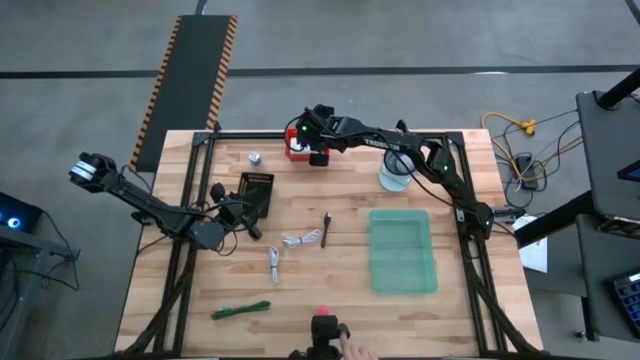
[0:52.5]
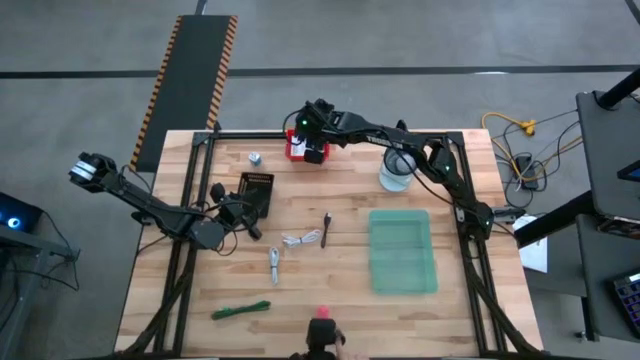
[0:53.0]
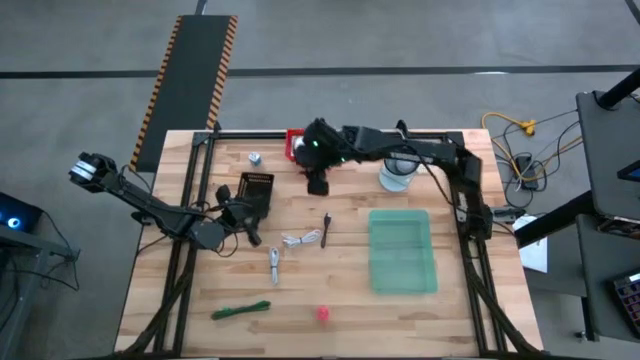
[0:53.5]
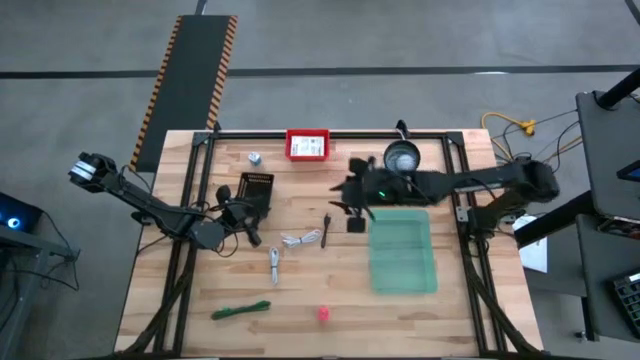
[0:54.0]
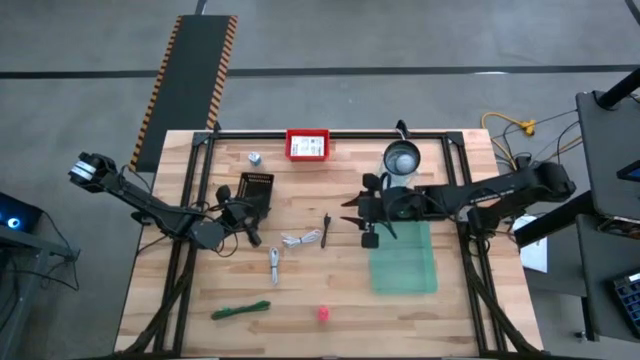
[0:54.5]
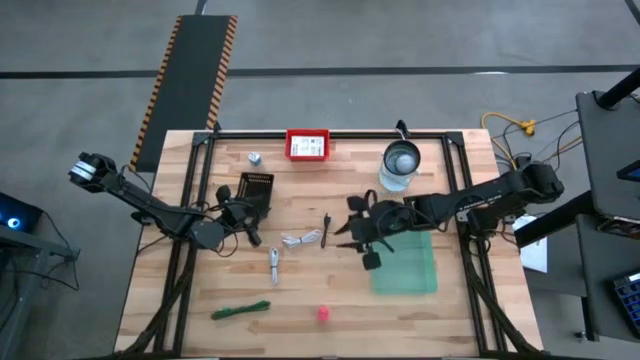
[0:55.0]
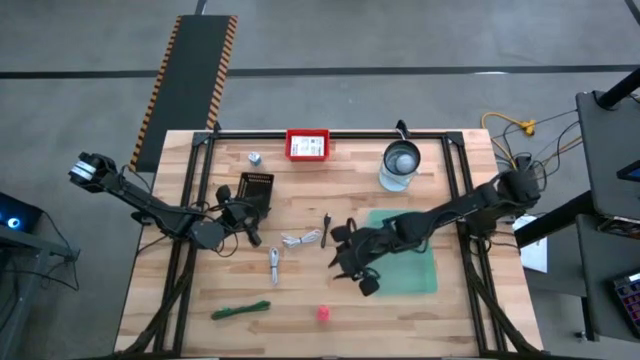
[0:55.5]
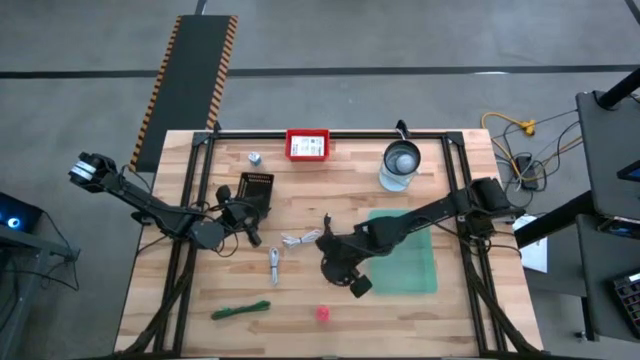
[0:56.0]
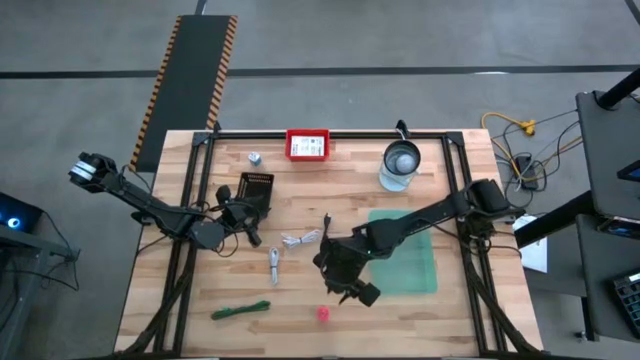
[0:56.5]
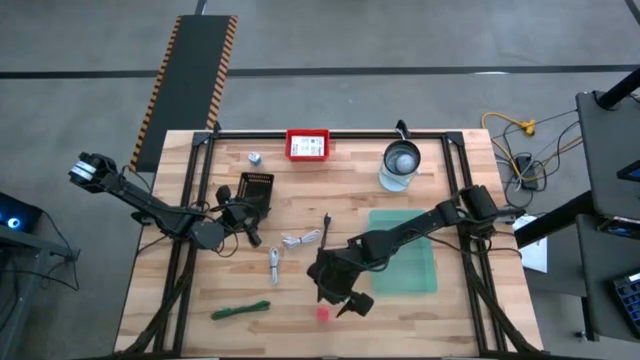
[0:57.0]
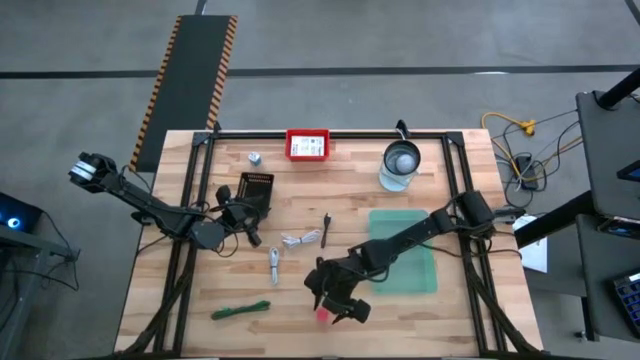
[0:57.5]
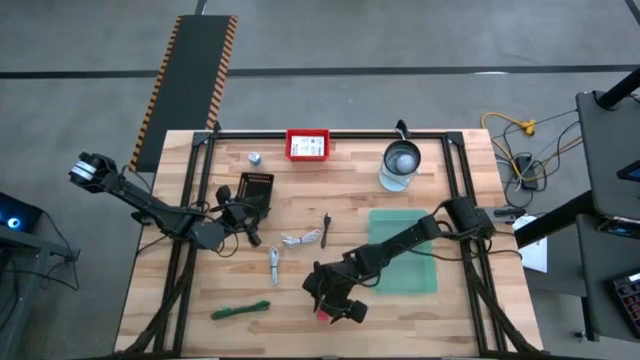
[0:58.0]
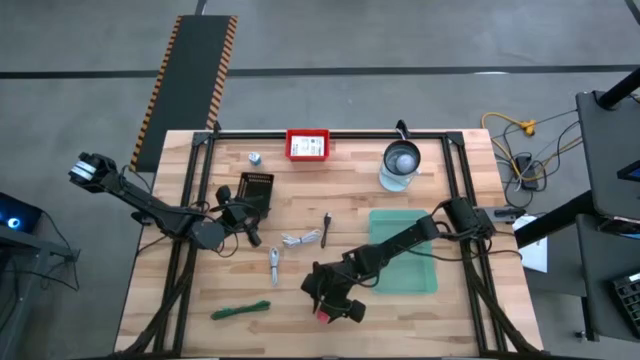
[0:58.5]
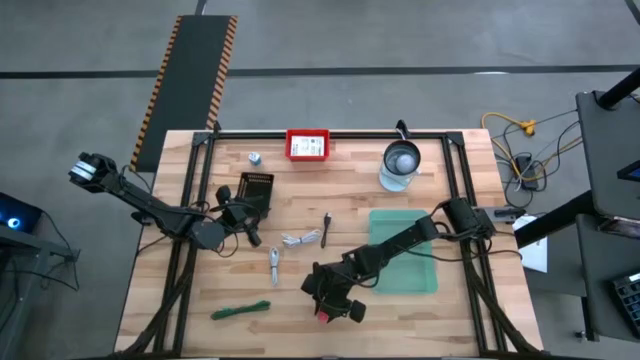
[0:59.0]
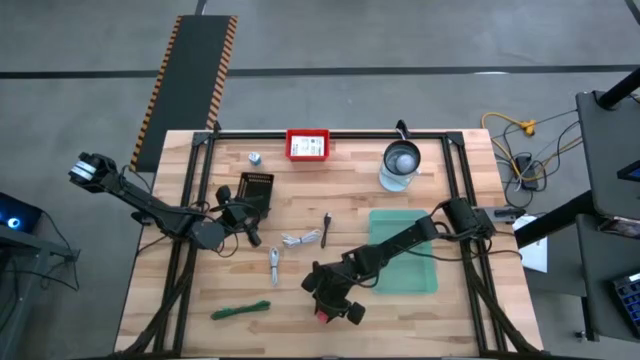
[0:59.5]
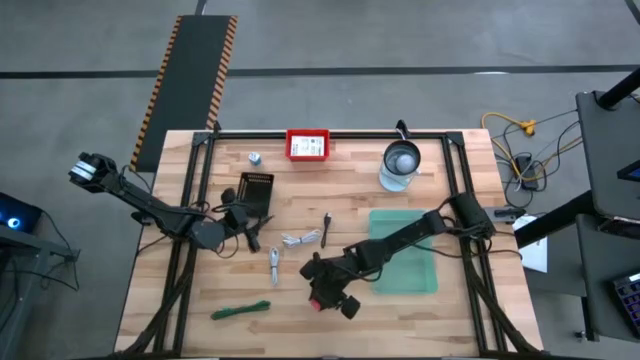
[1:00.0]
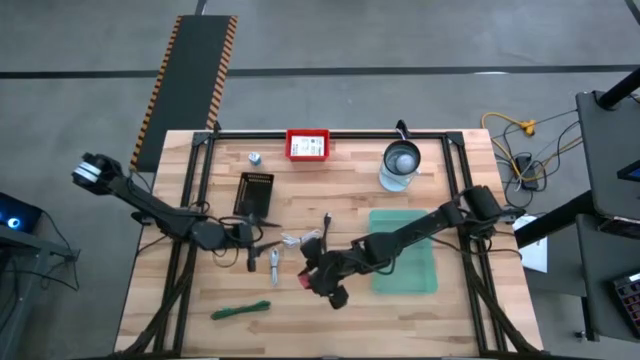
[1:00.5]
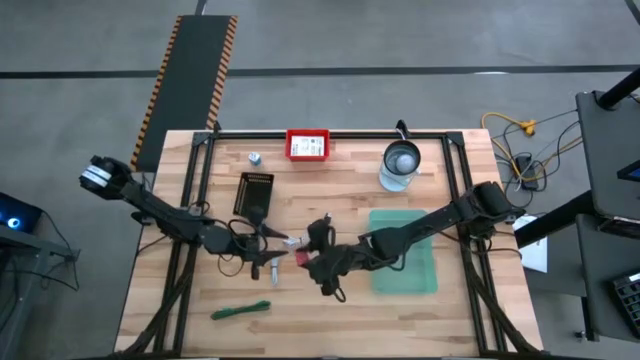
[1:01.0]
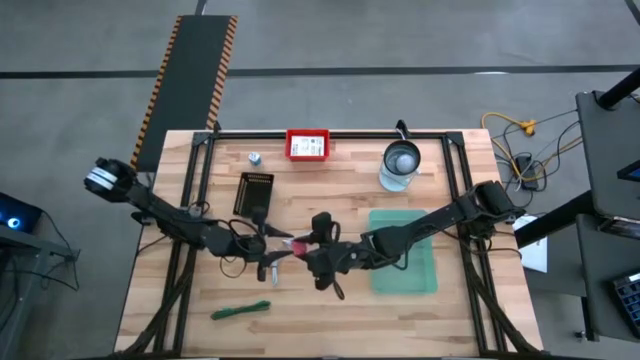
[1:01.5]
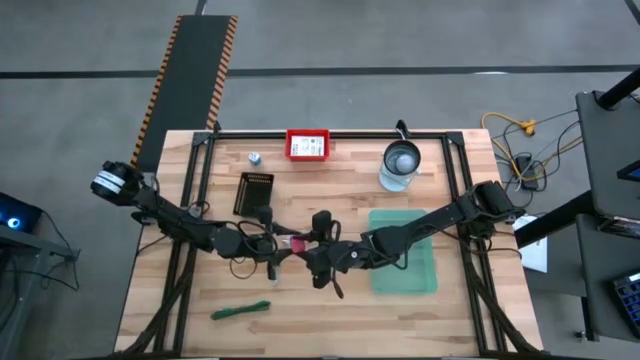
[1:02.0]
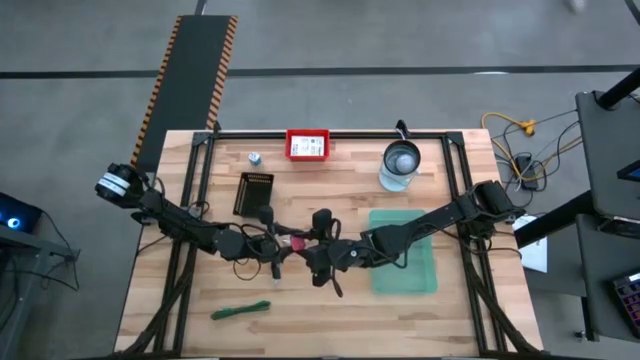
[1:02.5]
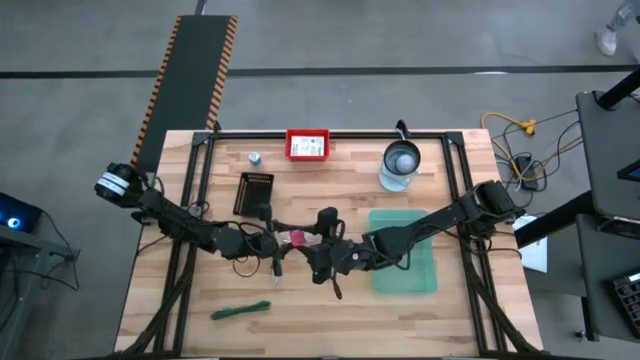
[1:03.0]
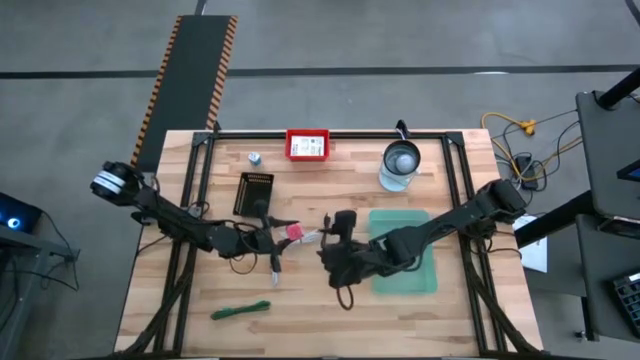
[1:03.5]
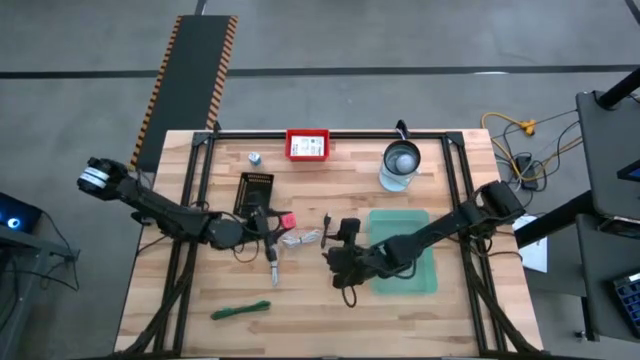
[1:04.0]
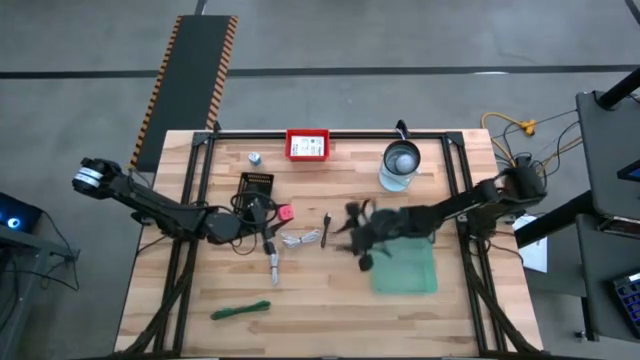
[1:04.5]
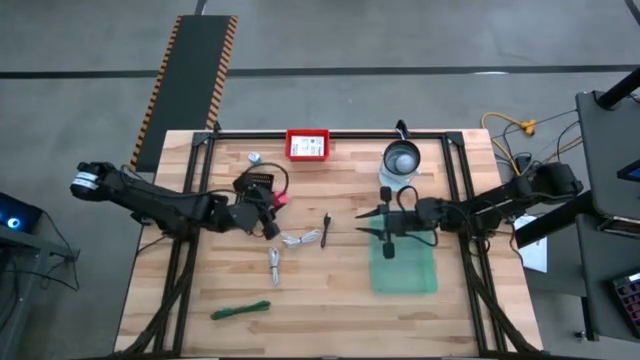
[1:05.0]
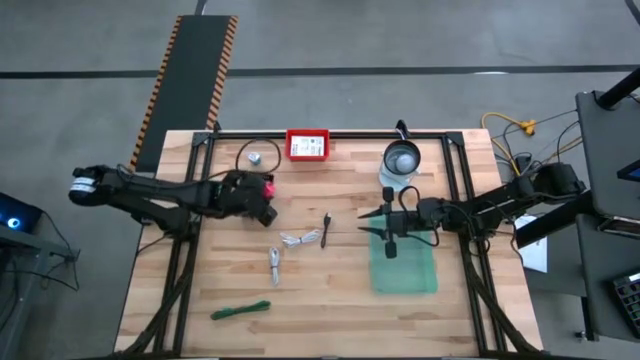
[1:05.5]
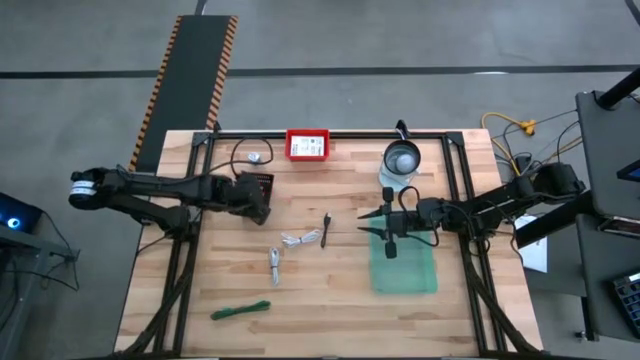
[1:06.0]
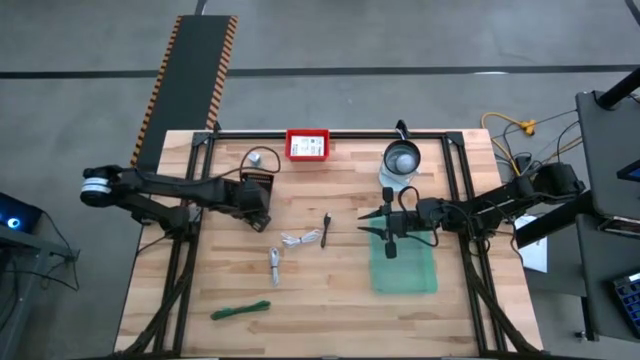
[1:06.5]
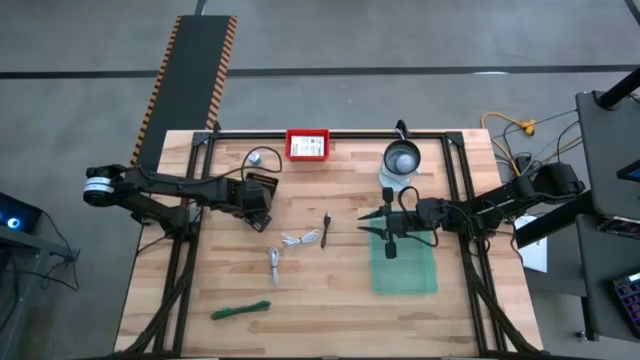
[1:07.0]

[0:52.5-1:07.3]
Task: Pick and place items into bin
Put the pink charger adapter into the black bin

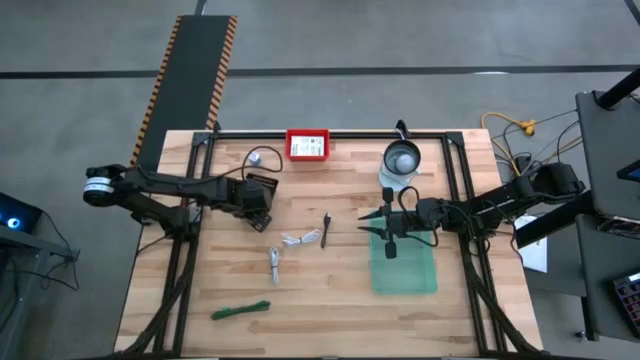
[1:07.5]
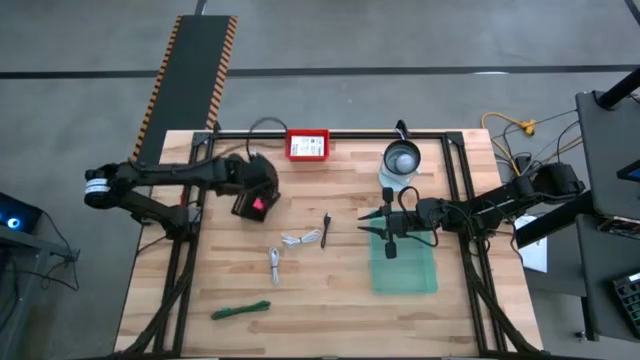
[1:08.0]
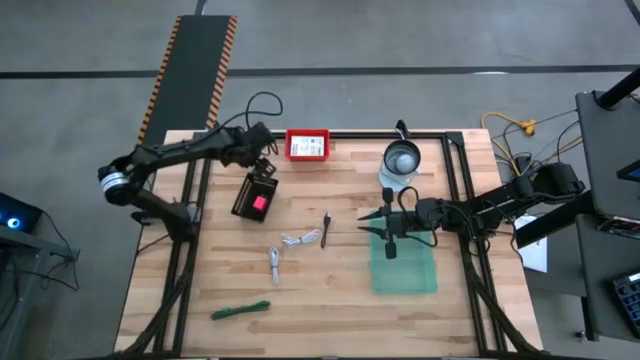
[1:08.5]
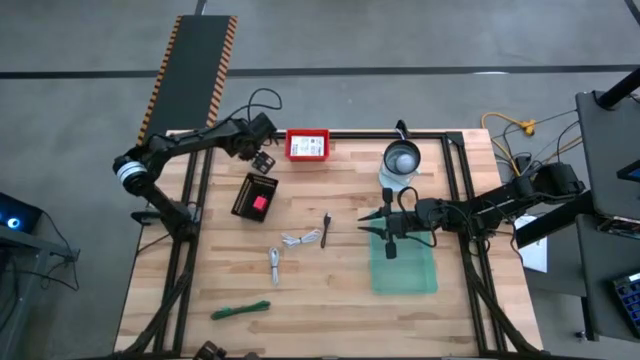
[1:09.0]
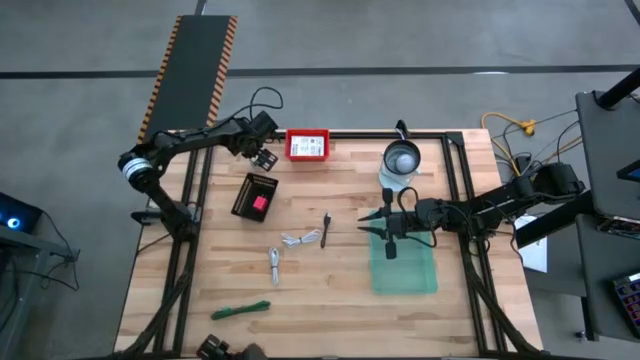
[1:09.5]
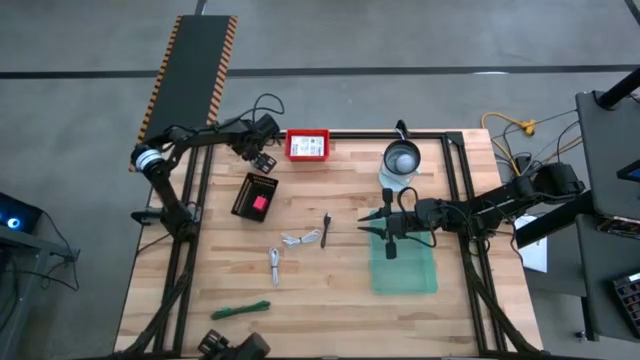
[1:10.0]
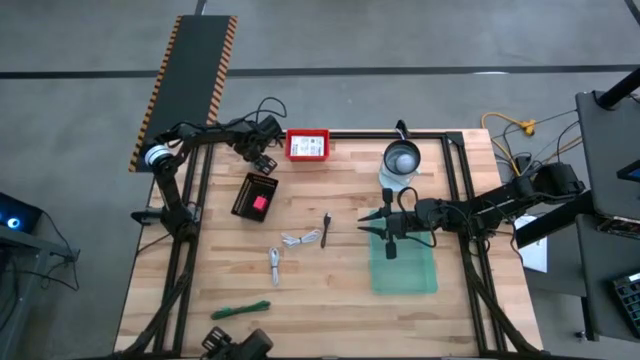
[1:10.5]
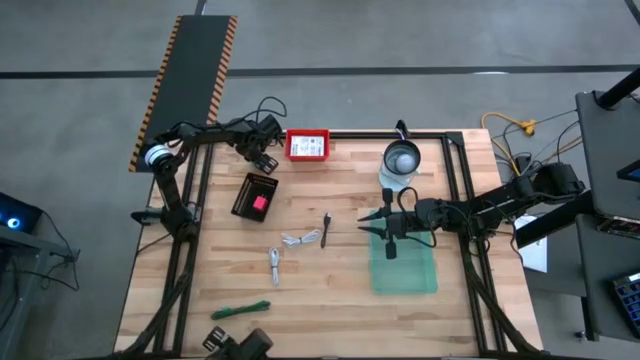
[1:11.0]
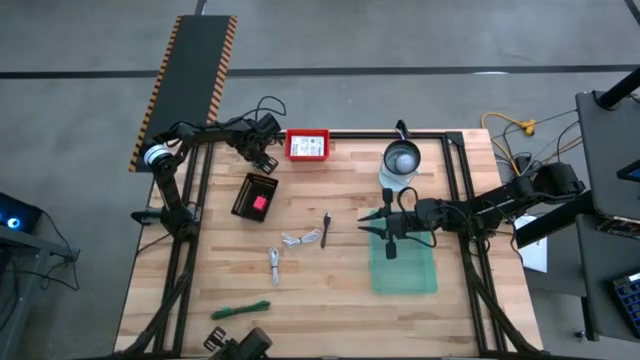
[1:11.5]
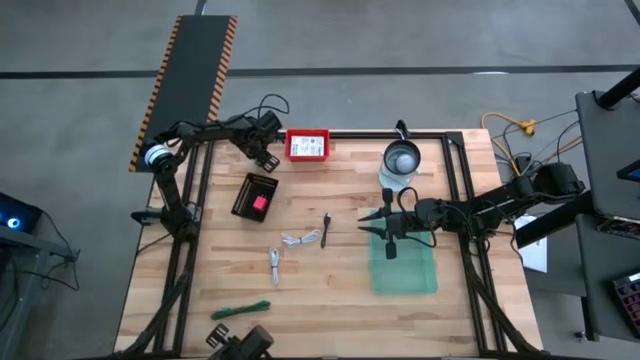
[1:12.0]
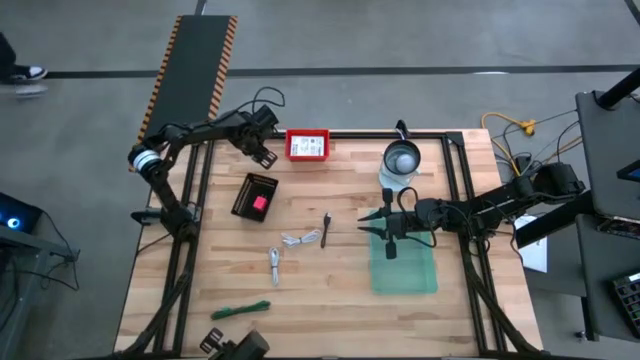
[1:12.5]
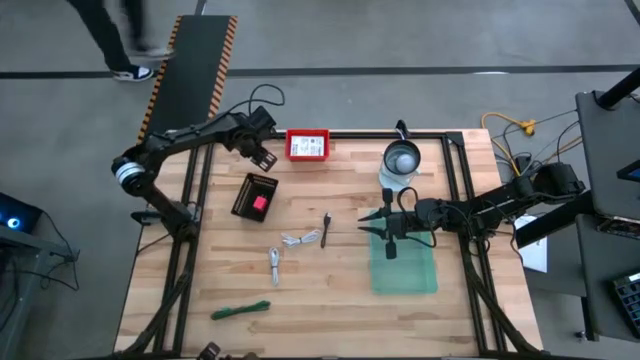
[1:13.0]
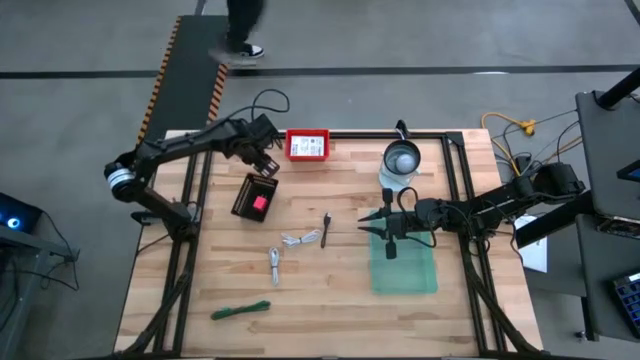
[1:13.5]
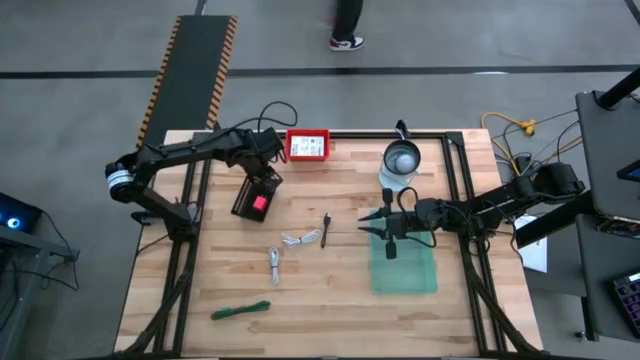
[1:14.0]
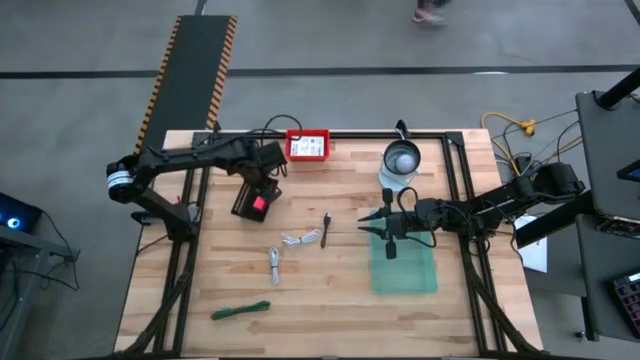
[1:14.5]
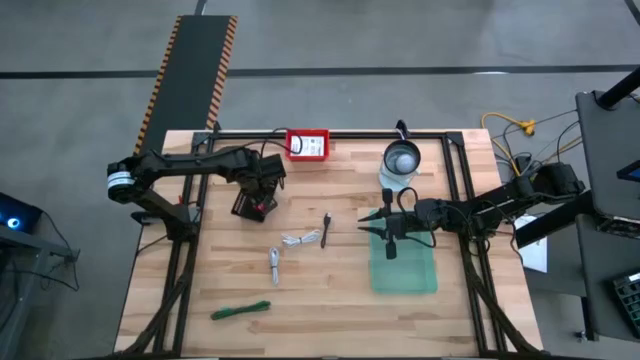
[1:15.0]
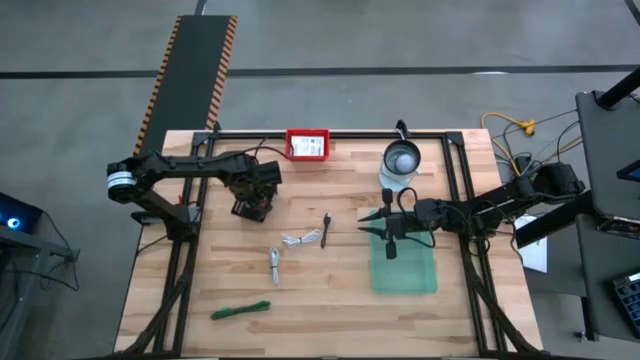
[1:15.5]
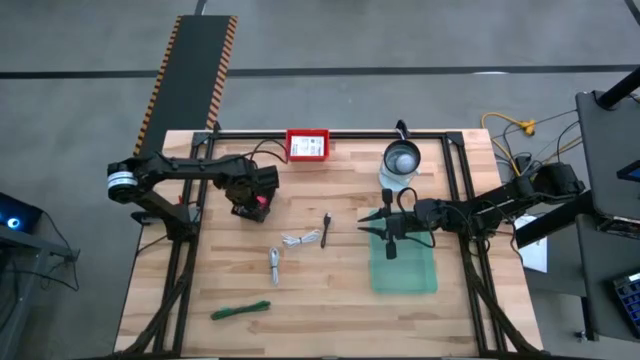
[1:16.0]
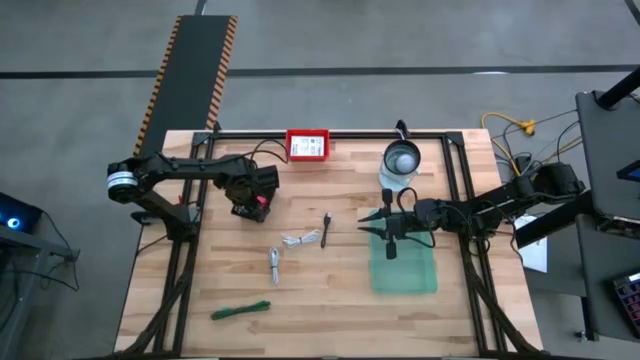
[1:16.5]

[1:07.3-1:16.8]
Put the blue charger adapter into the black bin
